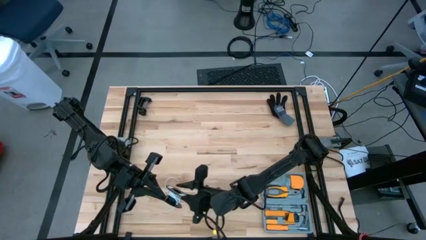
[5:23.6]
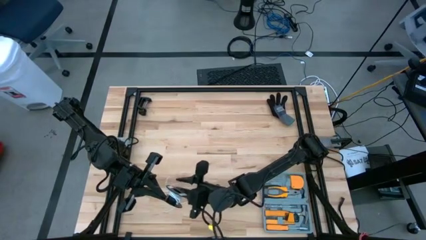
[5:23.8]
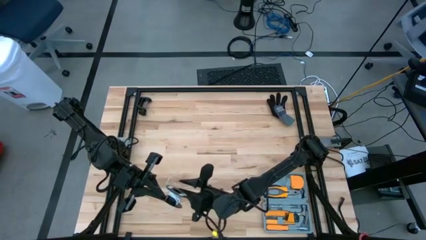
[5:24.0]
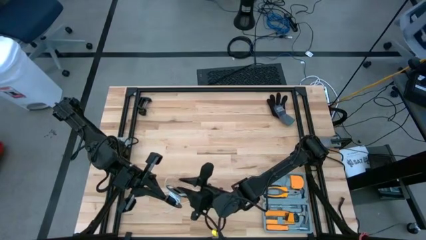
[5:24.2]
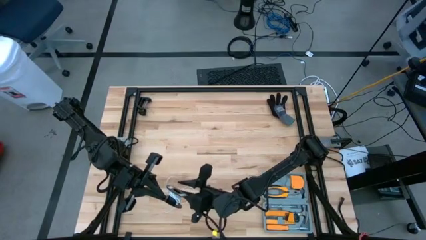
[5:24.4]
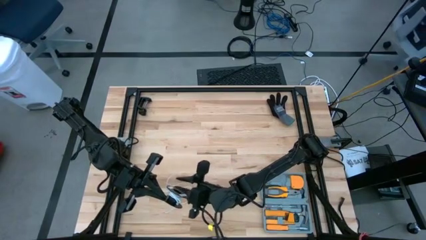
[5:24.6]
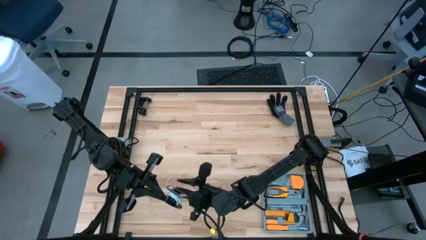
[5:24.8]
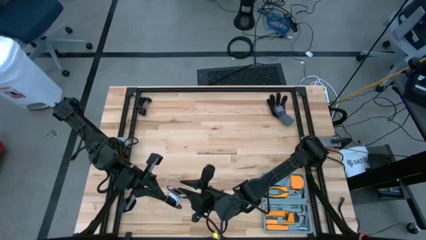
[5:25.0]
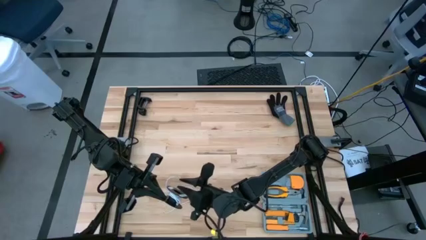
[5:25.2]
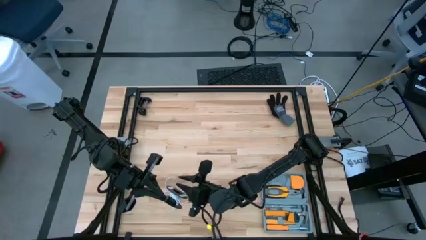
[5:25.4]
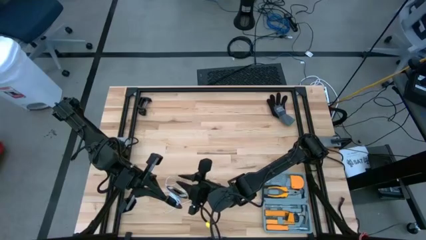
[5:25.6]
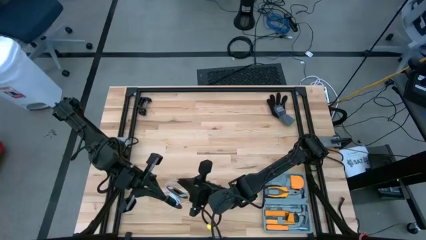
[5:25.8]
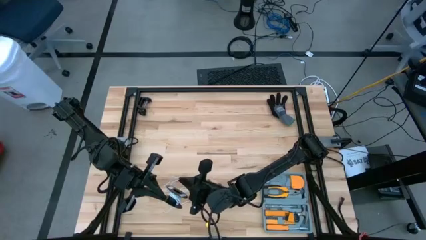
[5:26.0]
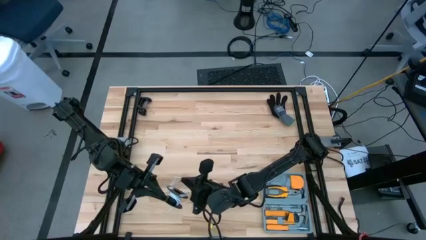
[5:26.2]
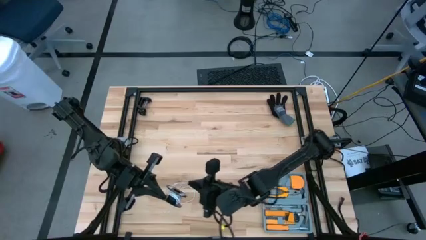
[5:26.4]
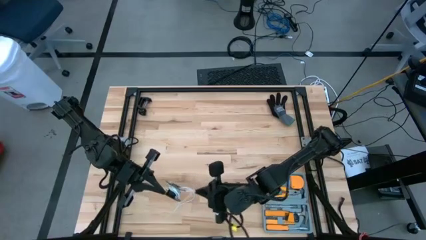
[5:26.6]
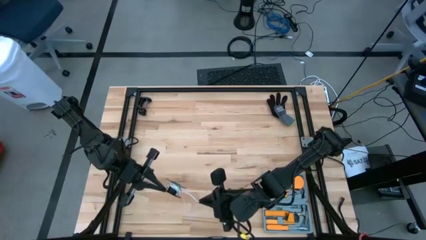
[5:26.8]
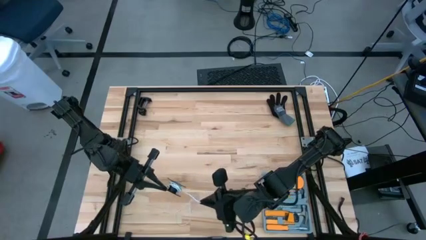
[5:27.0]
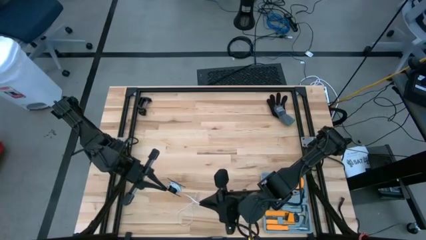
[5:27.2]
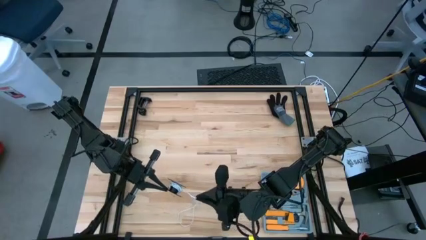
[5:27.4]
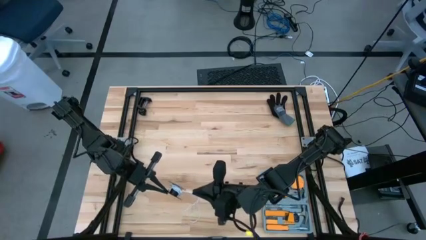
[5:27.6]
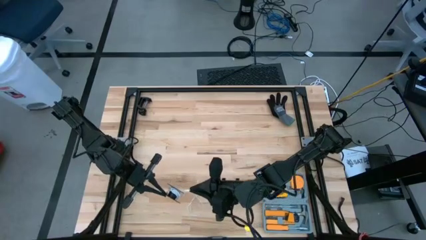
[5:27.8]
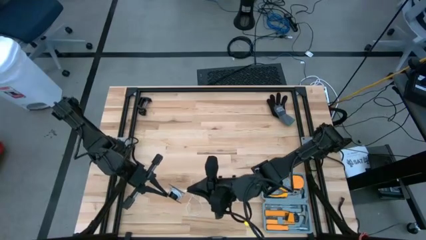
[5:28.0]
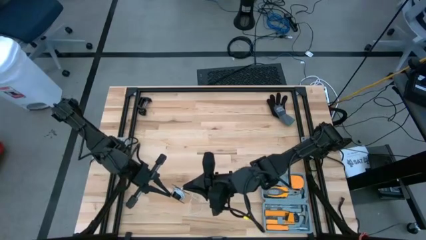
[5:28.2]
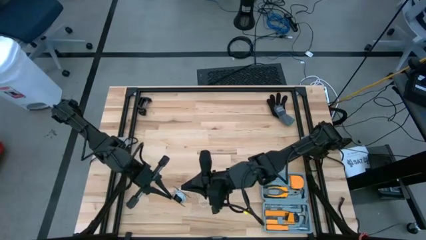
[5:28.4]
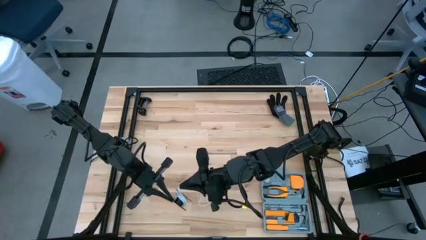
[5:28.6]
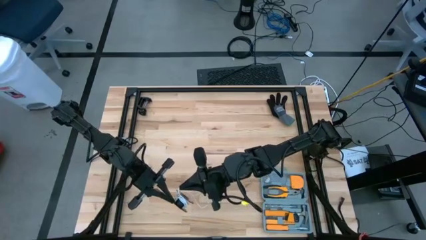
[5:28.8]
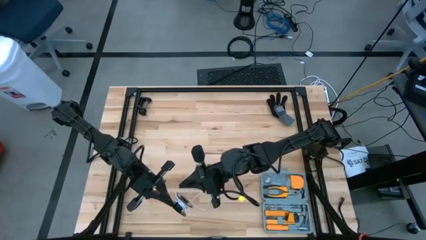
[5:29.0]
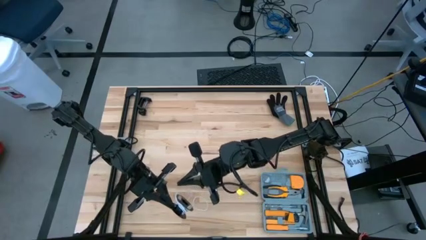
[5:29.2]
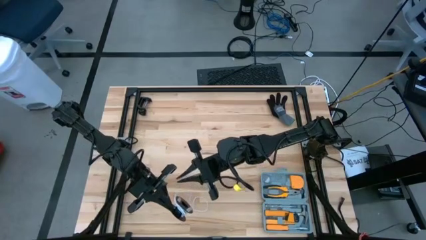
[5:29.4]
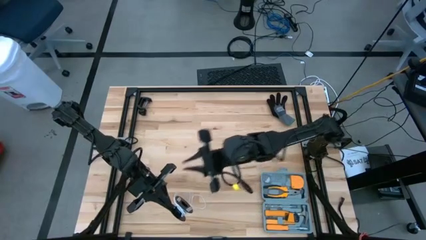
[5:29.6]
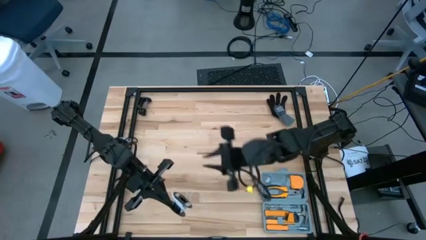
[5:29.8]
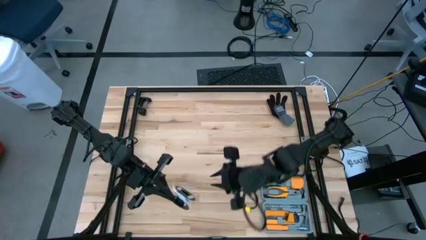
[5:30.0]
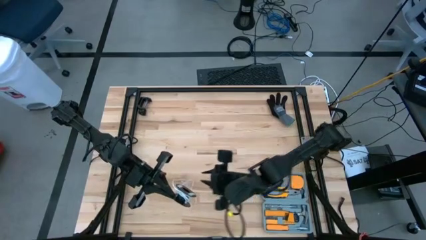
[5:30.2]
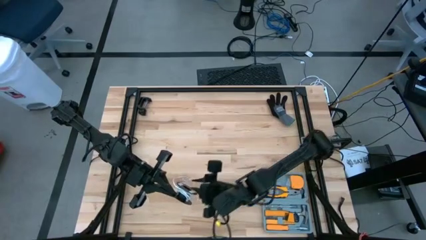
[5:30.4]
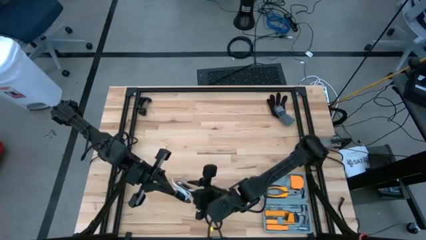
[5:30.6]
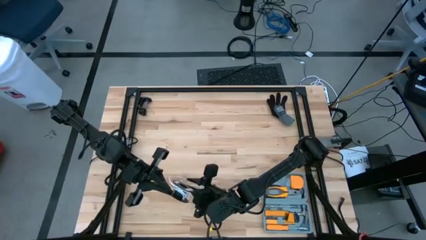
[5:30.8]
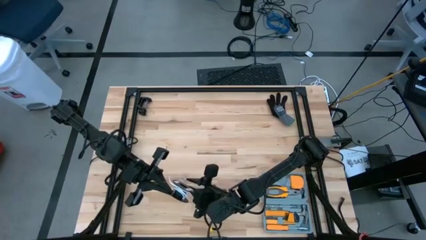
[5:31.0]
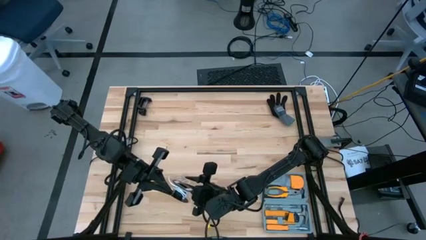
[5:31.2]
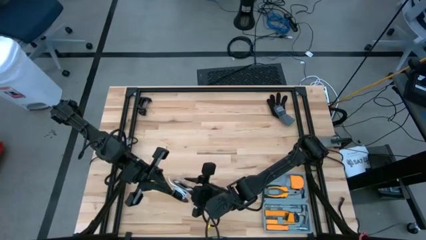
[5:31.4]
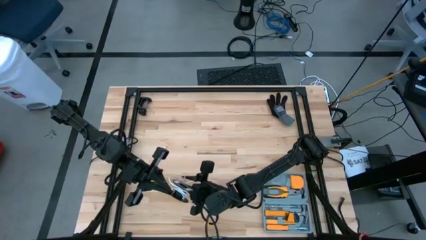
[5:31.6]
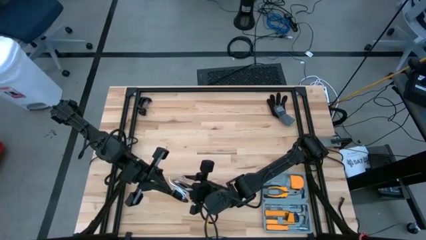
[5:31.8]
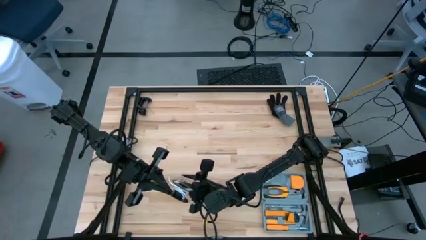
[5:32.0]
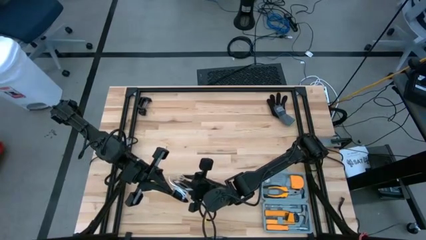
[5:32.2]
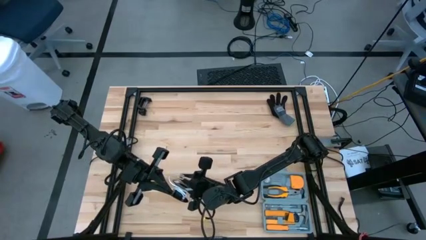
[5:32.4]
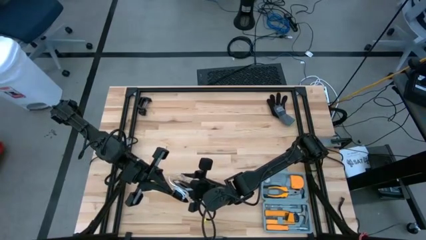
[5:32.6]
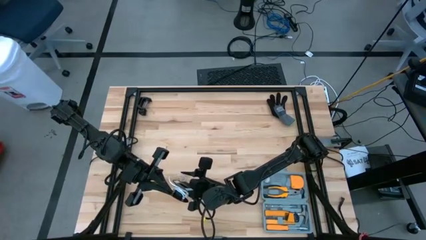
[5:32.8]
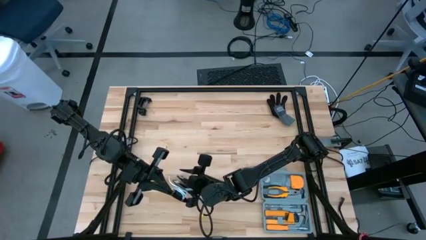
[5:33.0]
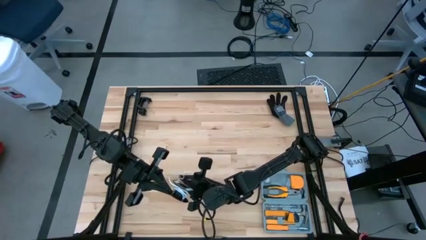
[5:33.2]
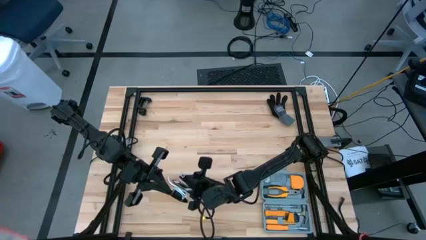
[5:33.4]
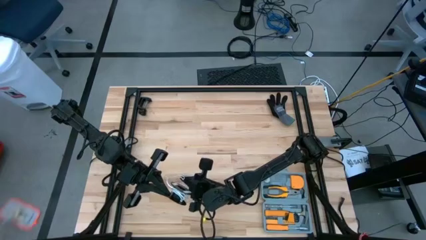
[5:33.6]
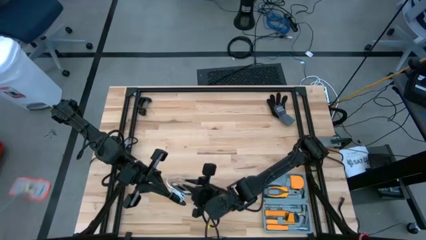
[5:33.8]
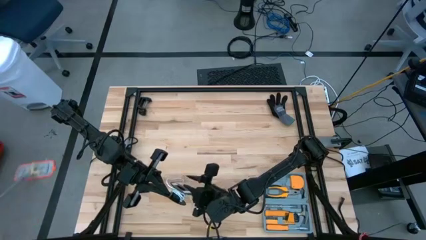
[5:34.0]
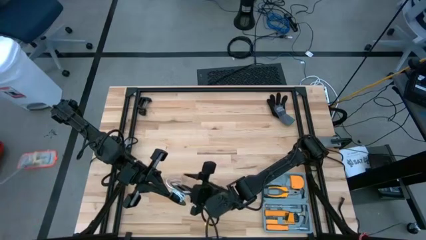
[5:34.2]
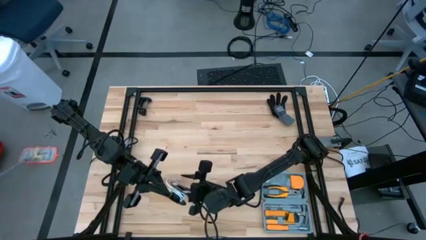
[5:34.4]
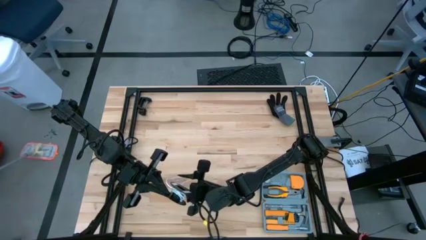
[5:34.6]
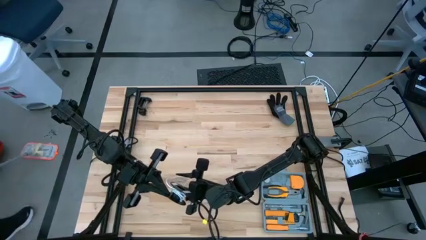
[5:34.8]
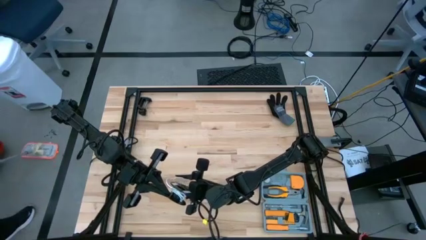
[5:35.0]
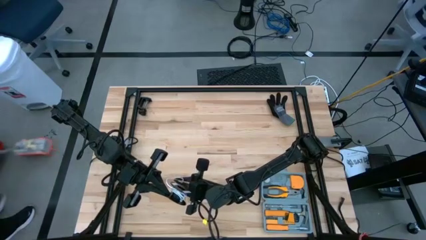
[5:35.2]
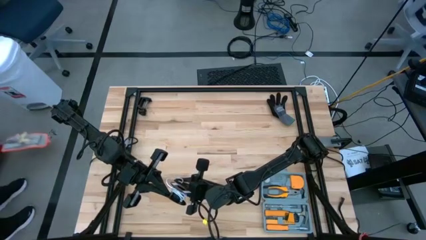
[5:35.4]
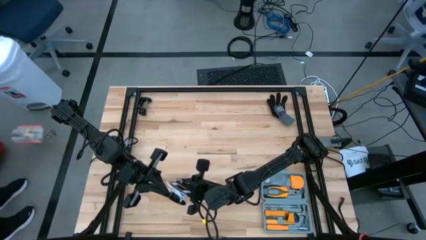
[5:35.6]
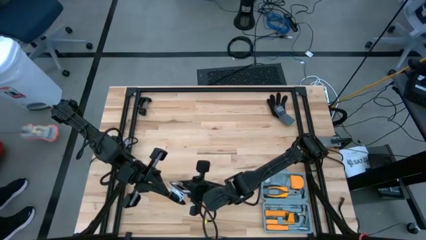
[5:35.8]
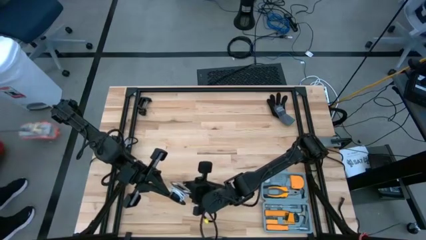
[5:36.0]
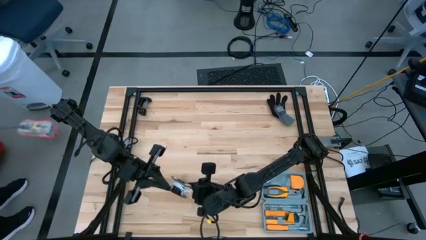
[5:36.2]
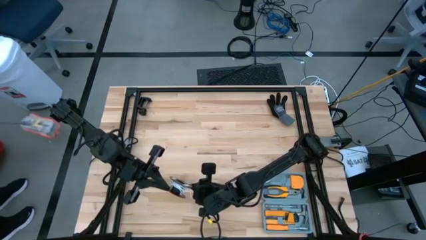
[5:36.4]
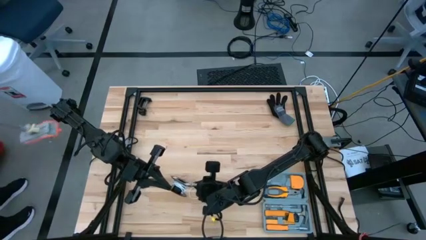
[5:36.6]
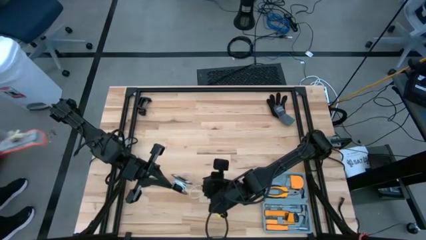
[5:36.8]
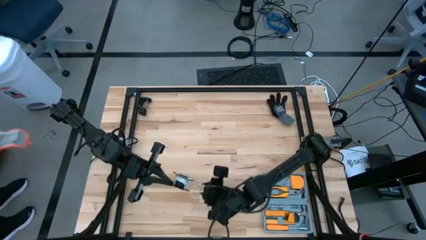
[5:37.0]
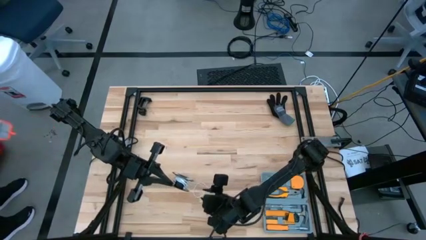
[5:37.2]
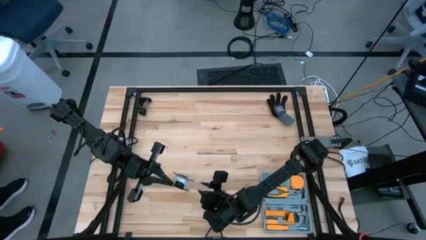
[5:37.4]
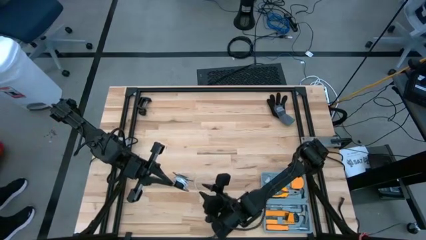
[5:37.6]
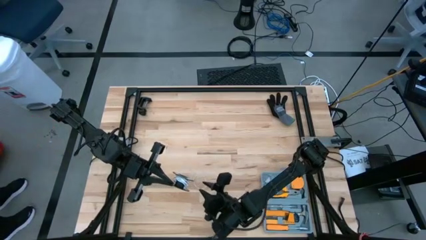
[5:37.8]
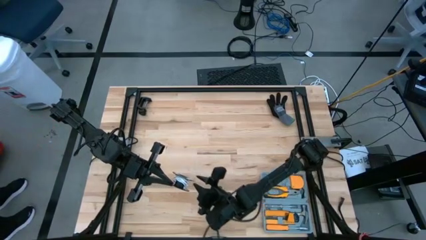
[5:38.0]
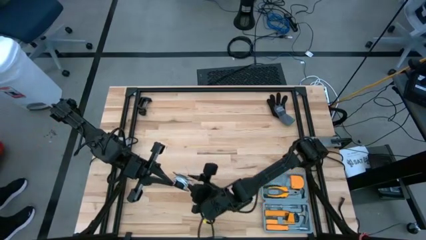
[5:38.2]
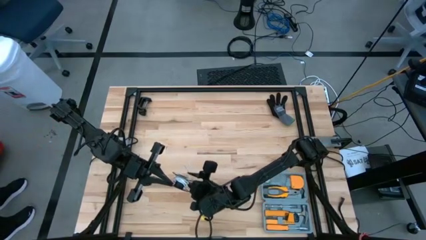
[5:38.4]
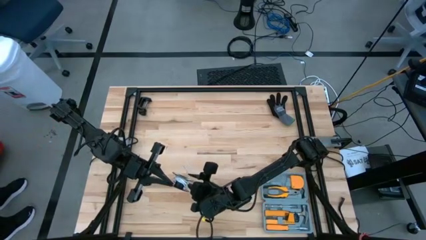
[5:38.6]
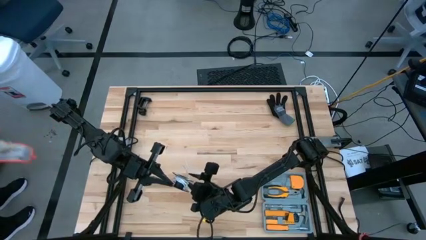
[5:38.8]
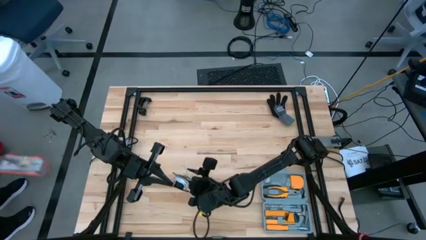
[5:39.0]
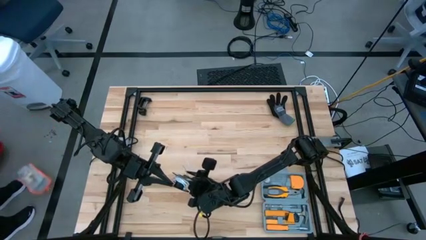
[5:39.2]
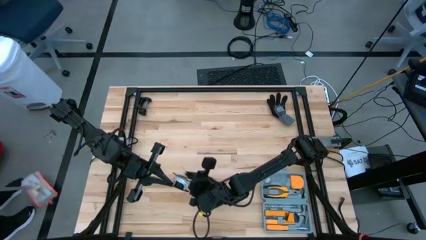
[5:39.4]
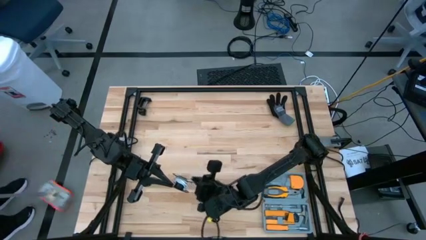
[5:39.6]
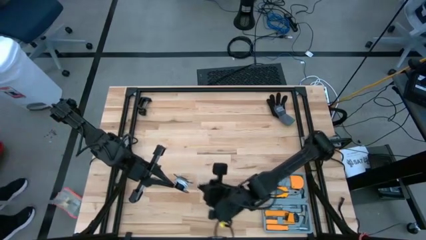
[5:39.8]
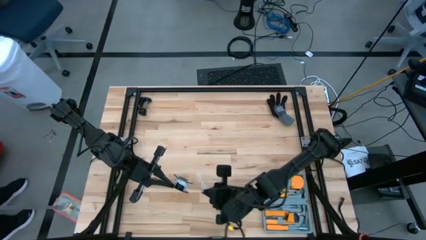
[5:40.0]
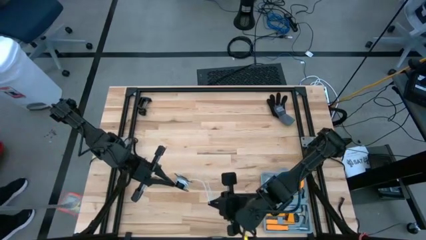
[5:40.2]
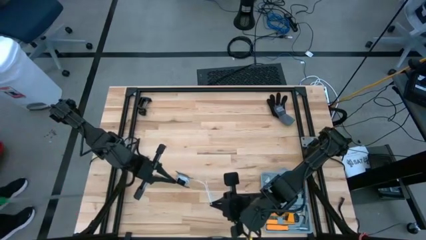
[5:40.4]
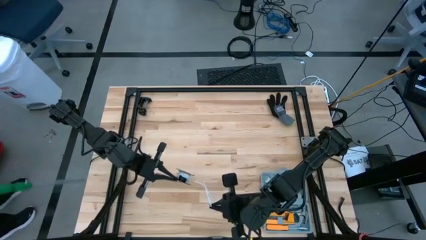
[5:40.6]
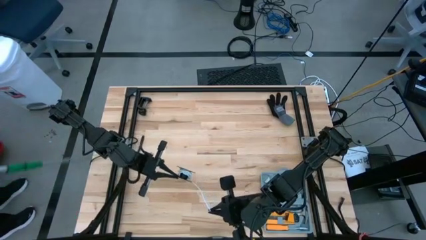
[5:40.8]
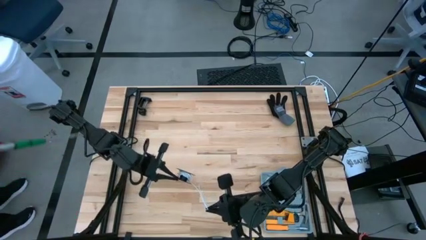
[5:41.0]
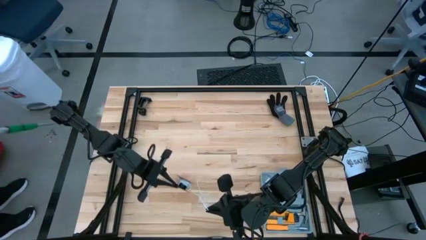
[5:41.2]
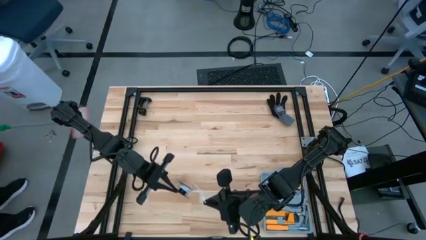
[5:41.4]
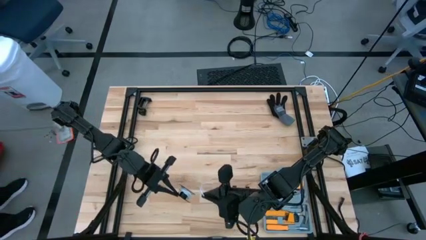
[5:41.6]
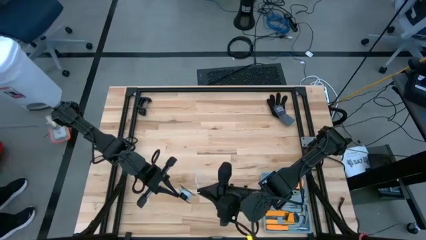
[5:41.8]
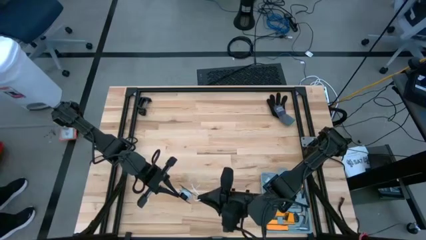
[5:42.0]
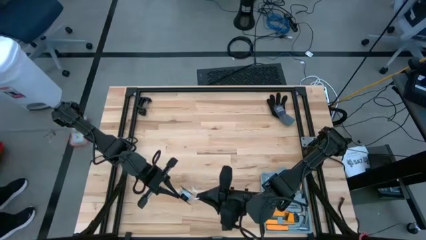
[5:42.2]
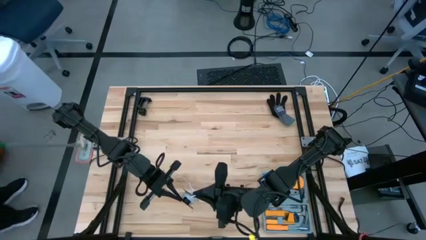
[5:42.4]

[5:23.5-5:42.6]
Task: Coil cords
Coil the white cable wire onto the spool
